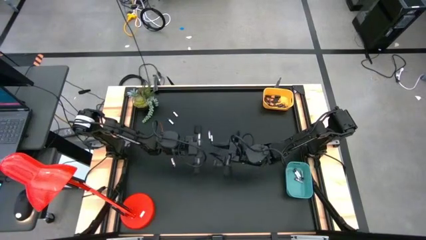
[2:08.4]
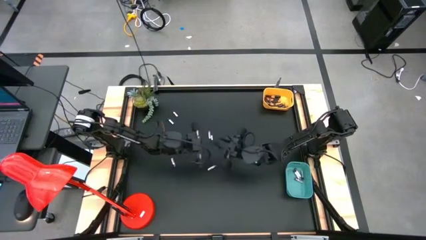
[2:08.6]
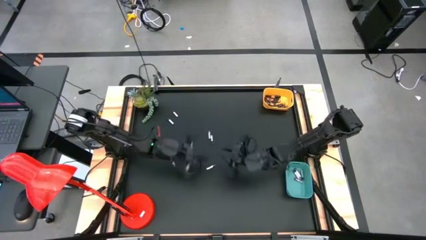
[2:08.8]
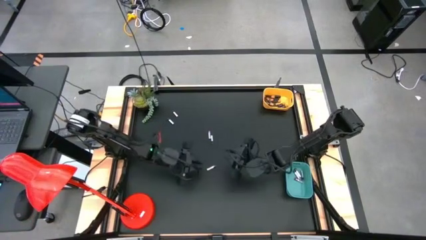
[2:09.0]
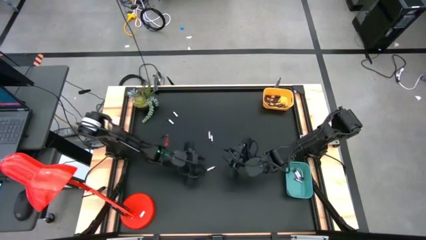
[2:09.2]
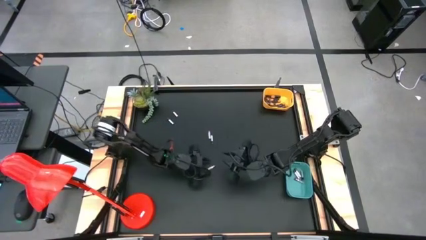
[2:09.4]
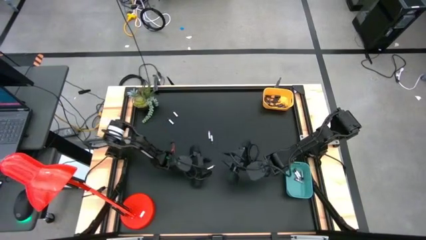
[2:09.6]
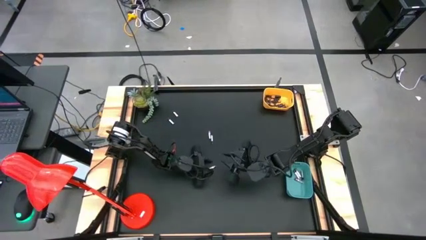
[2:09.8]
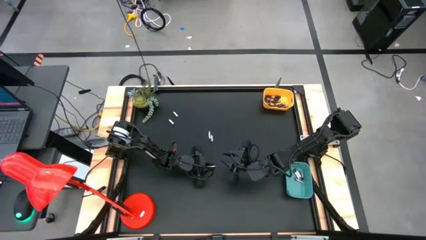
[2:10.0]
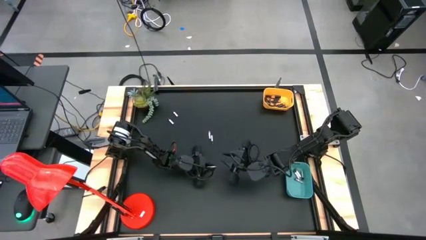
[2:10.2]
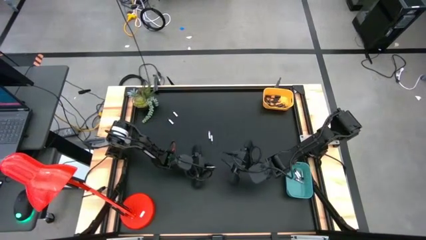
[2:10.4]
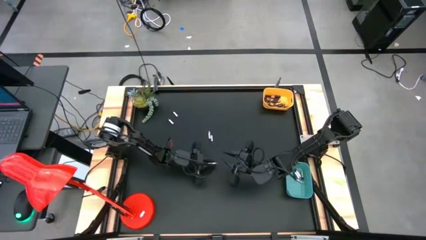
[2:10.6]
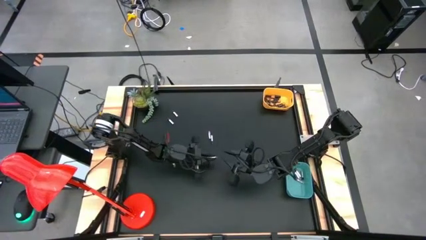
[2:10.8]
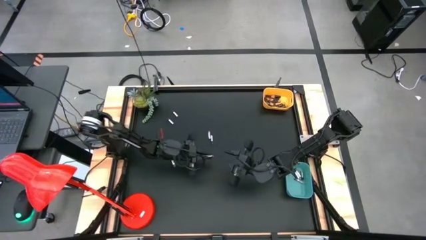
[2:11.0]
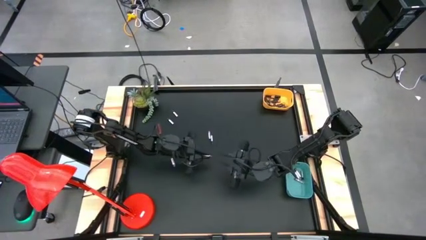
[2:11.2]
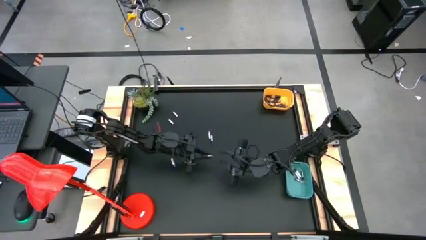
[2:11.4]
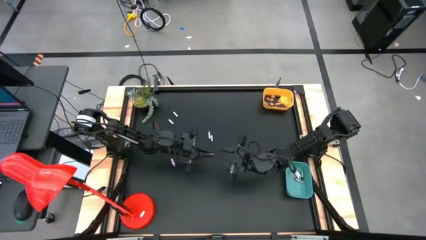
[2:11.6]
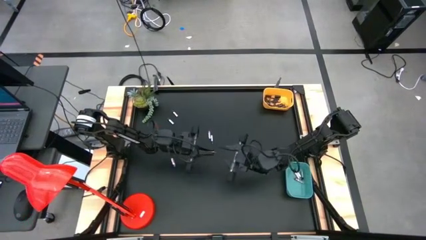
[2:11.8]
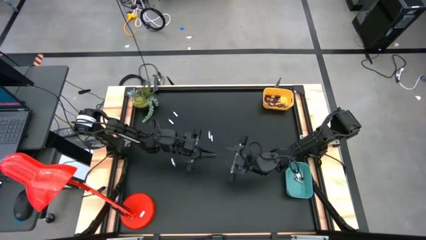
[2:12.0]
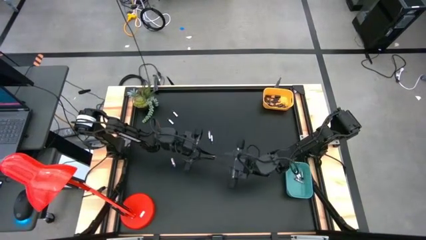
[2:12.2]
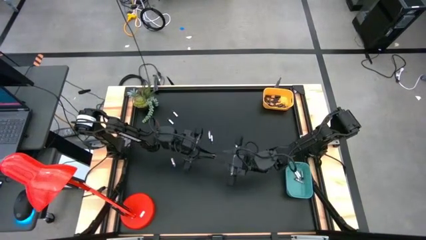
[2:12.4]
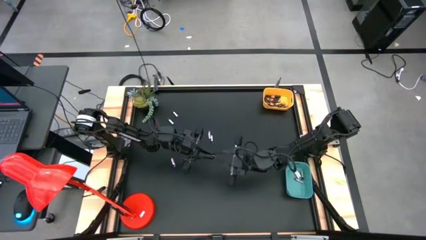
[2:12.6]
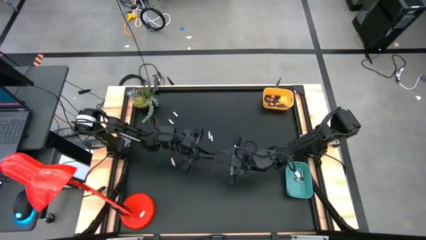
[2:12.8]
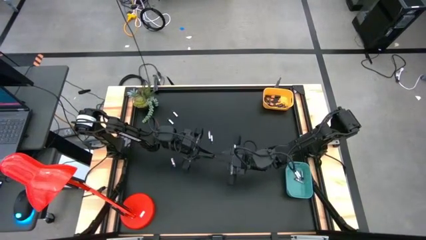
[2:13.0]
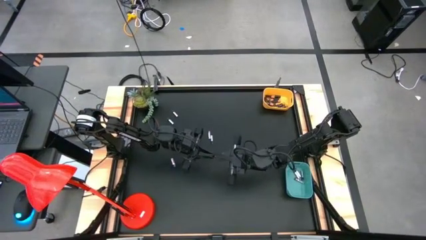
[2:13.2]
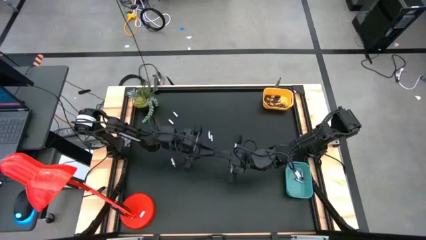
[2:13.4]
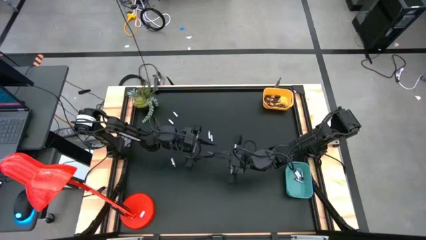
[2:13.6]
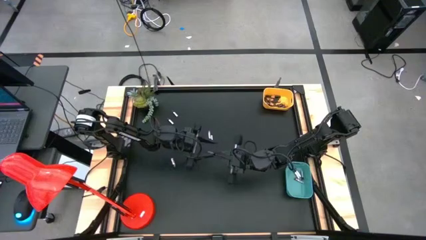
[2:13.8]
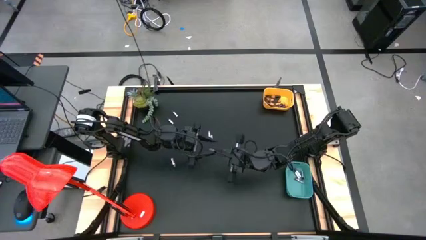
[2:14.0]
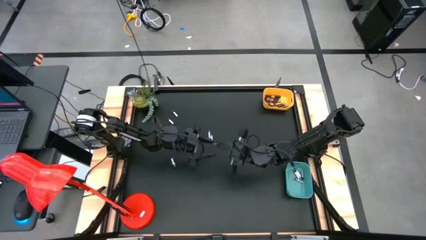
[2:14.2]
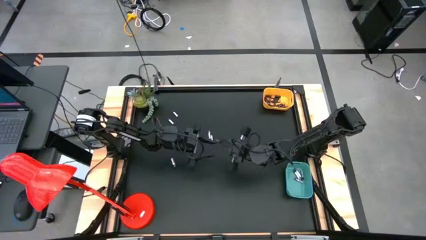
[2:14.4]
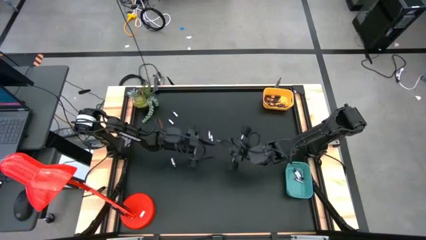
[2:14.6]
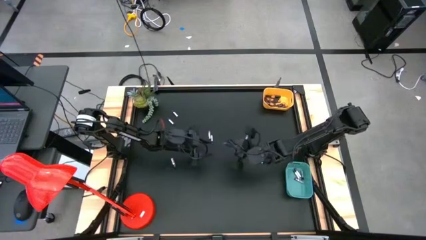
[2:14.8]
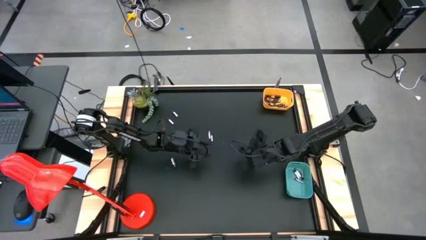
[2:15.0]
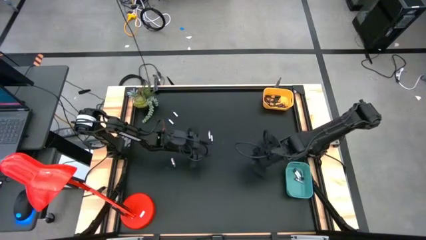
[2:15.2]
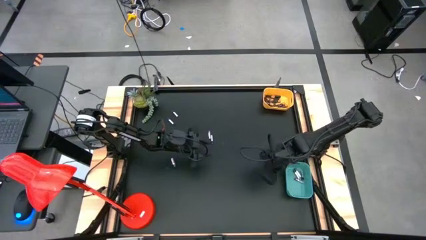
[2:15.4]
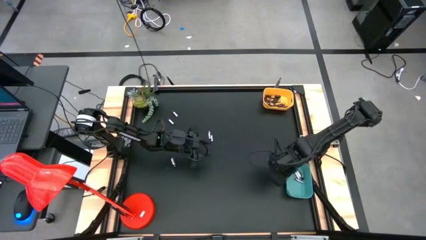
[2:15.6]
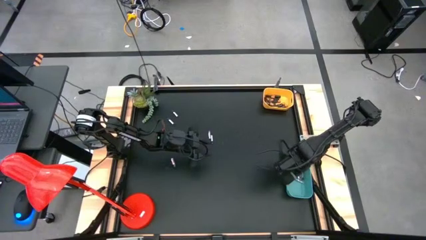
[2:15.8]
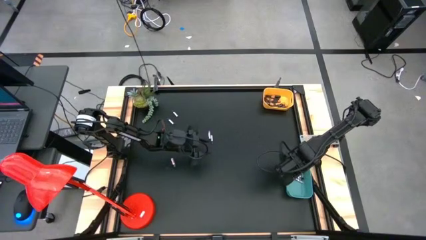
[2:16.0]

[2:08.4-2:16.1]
Task: Sort batteries
Put the silver battery into the green bin

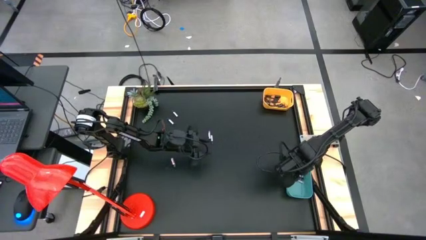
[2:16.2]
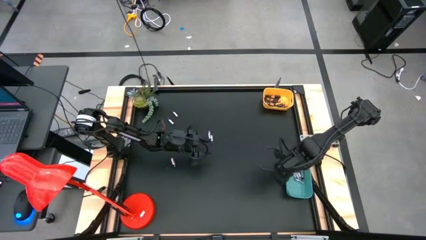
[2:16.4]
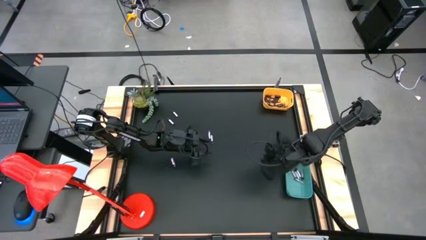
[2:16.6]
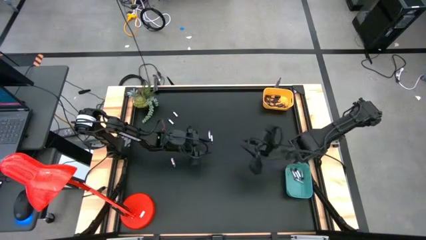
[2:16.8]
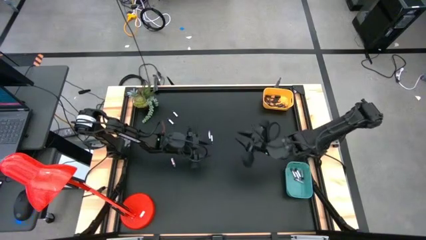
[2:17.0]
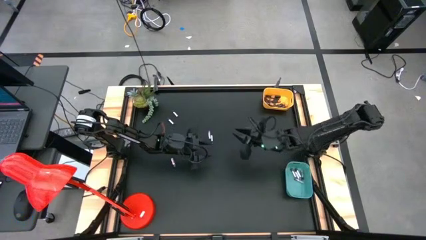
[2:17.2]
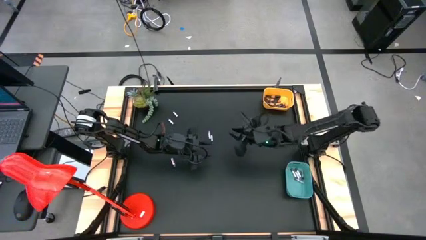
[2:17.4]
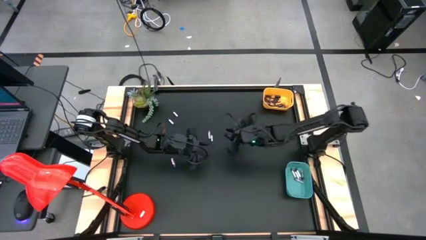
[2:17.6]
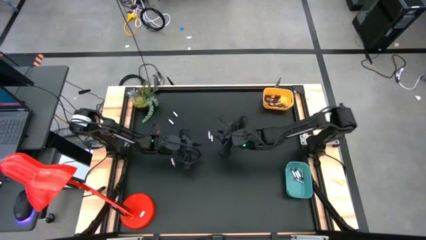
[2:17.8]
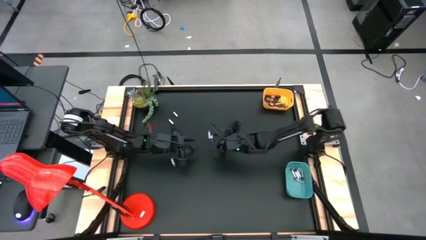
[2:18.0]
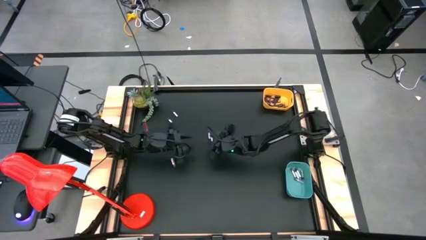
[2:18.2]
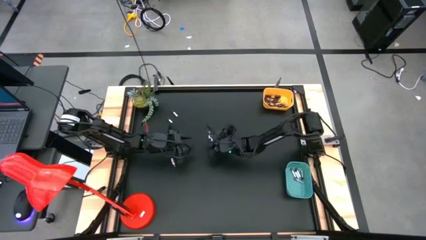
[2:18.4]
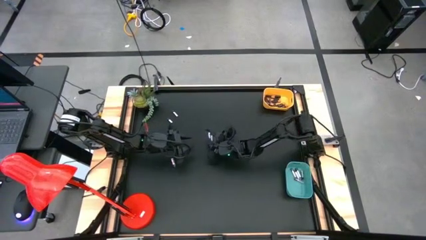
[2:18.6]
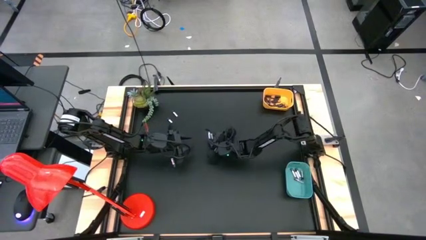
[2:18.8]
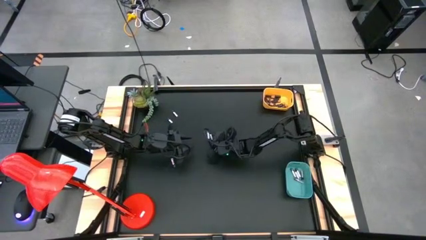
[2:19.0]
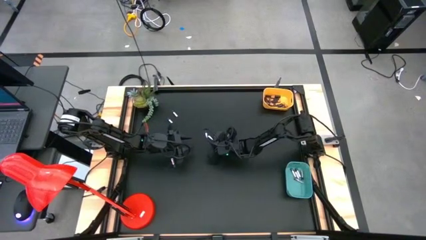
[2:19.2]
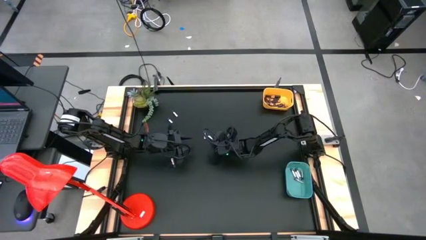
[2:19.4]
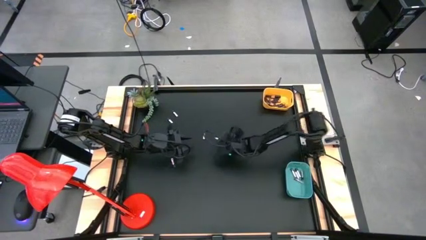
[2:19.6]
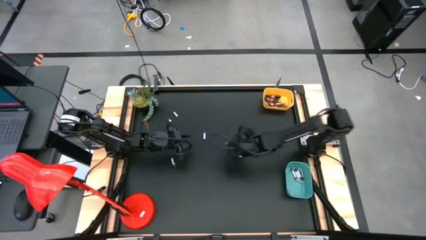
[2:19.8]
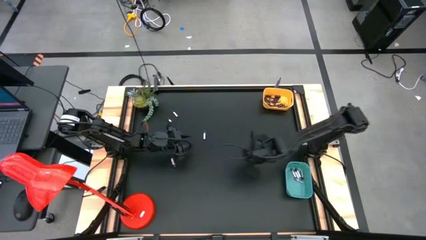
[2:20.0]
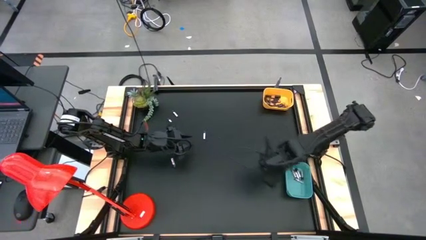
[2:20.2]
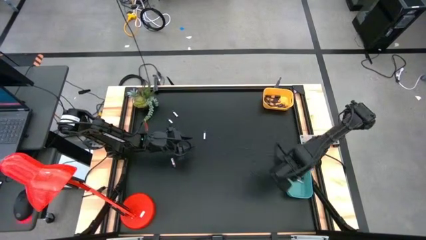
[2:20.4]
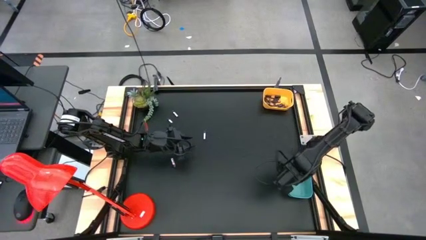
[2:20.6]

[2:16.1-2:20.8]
Put the silver battery into the green bin

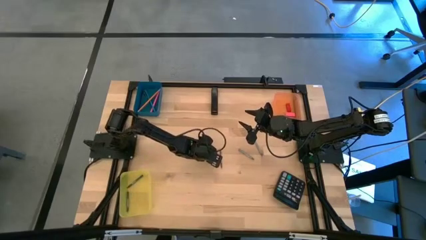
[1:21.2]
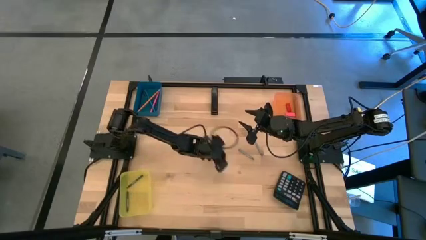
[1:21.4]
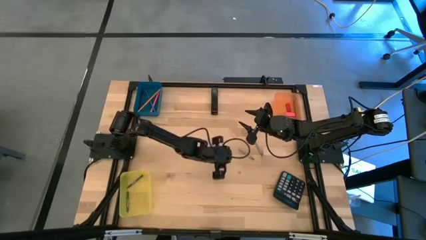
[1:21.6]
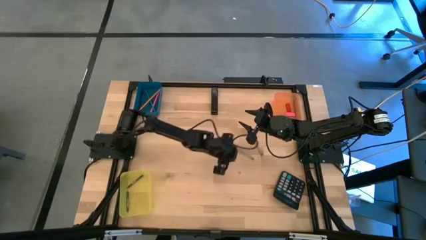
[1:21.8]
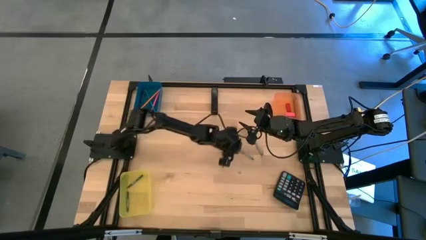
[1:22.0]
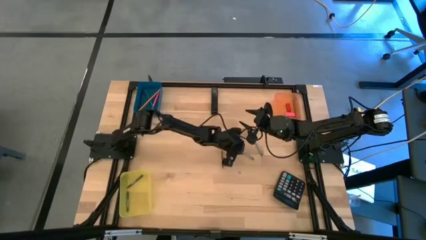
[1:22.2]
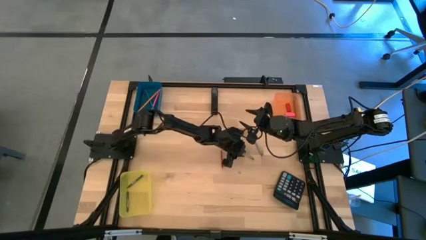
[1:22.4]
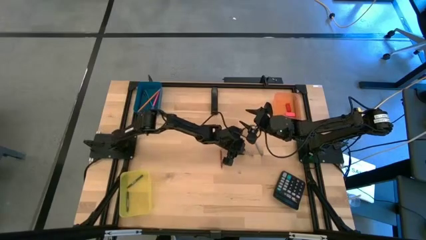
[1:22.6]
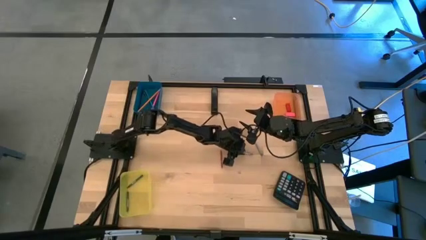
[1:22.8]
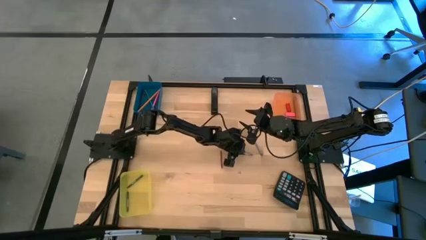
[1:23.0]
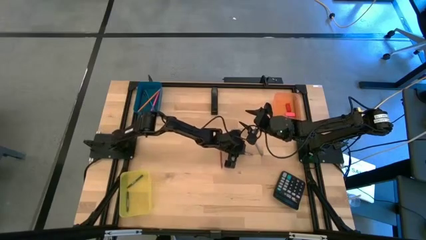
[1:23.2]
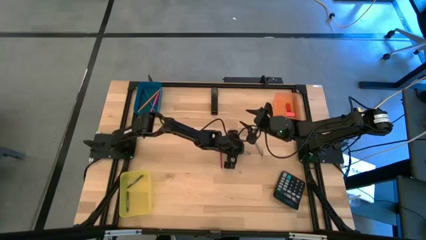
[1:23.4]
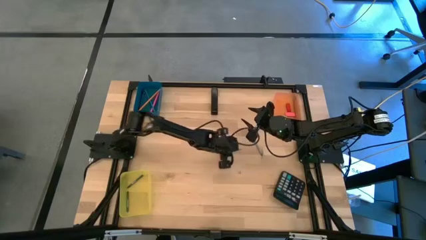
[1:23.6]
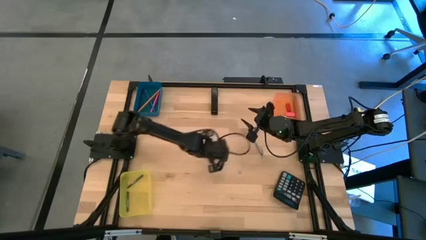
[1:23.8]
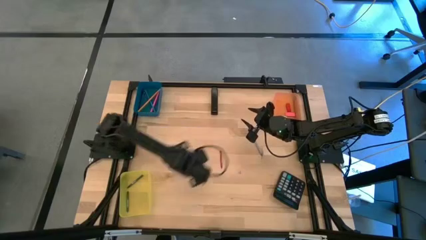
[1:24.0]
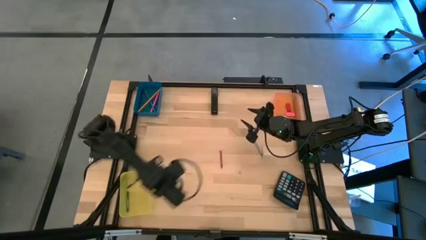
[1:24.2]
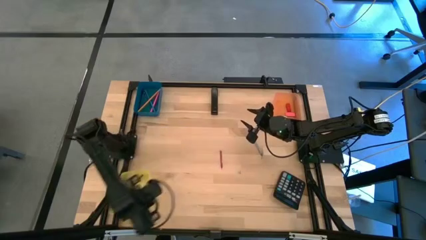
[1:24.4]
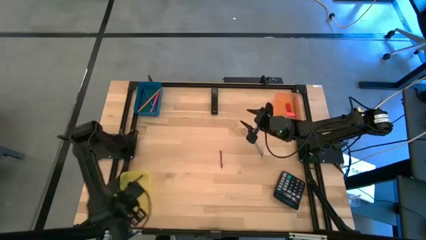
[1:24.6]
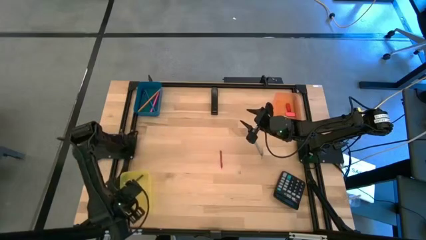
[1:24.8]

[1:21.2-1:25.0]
Task: Sort crayons/erasers/pens/pencils in bins
Put the left gray crayon into the yellow bin

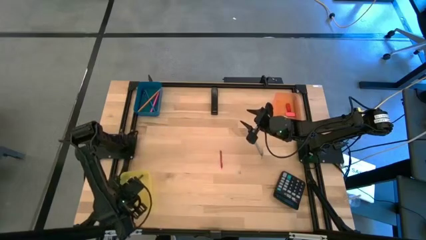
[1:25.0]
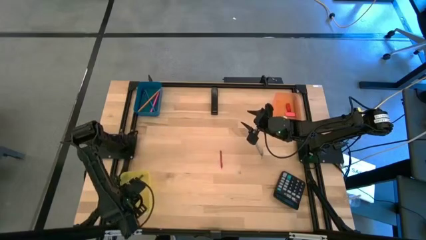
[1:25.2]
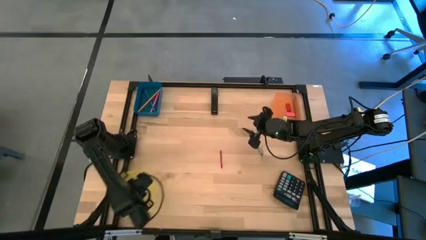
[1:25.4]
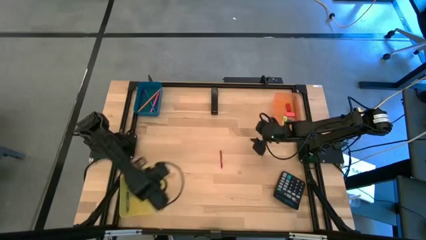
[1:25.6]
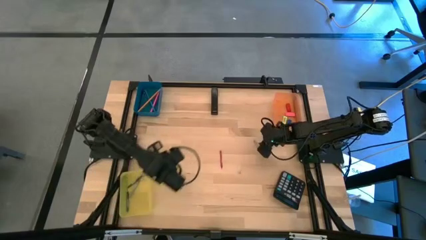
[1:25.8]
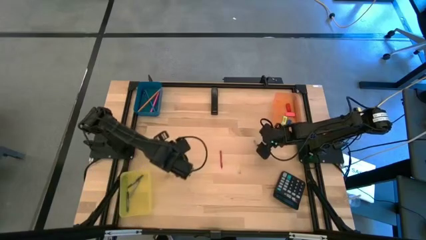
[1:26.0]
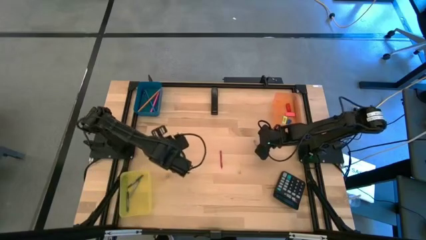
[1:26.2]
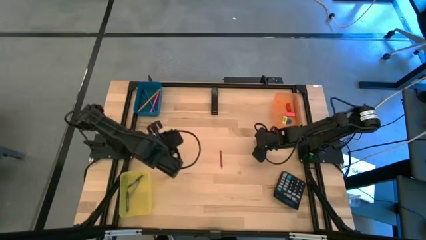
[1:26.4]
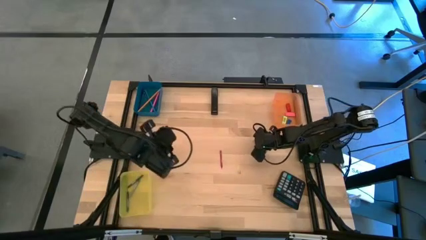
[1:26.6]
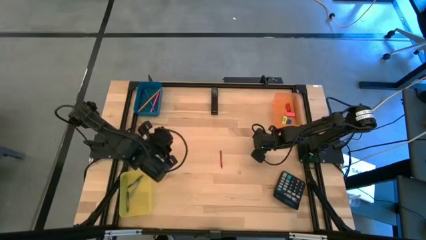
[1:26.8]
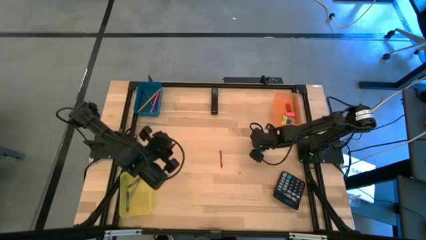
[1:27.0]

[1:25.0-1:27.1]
Put the gray crayon into the yellow bin
